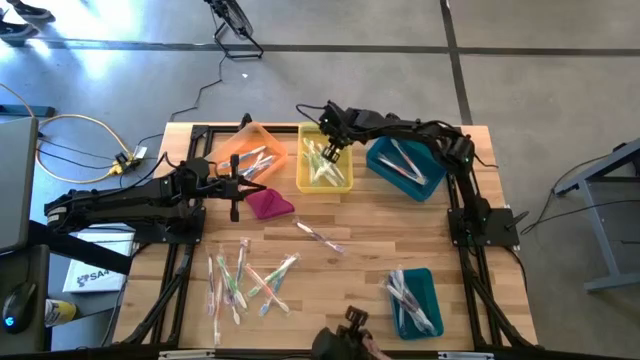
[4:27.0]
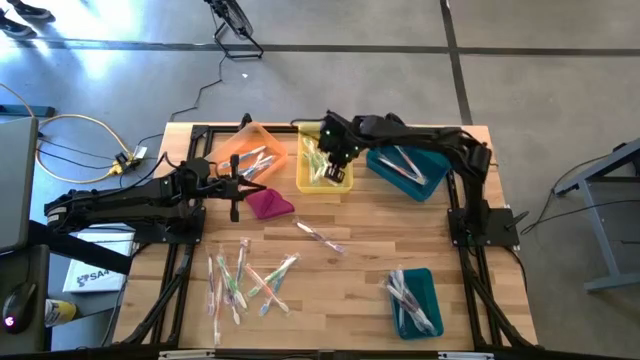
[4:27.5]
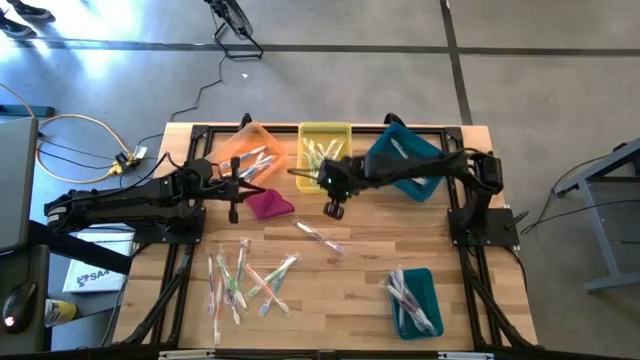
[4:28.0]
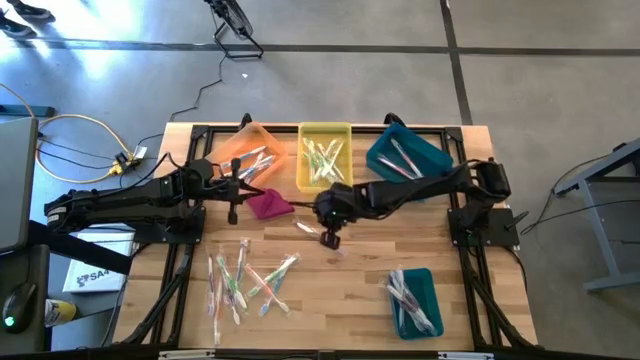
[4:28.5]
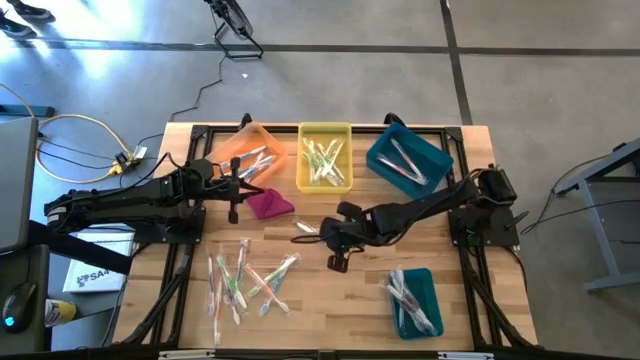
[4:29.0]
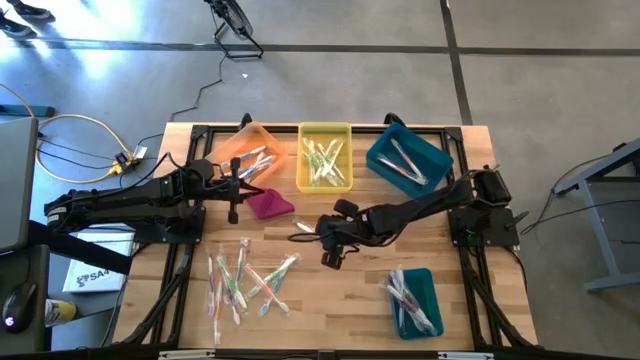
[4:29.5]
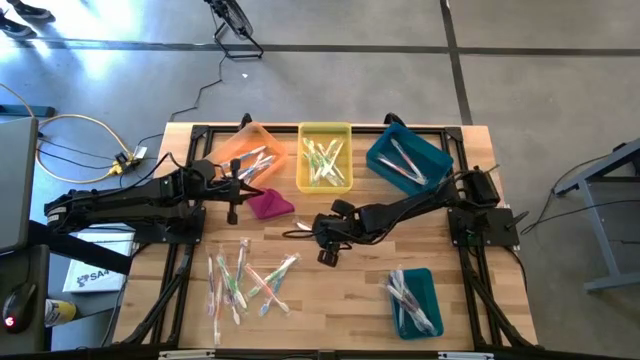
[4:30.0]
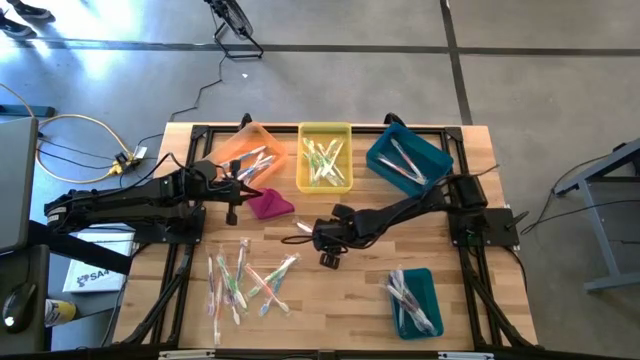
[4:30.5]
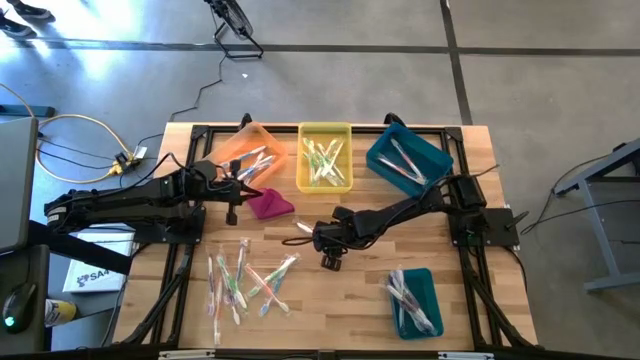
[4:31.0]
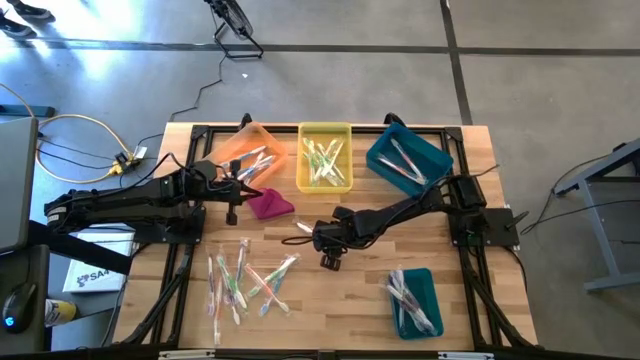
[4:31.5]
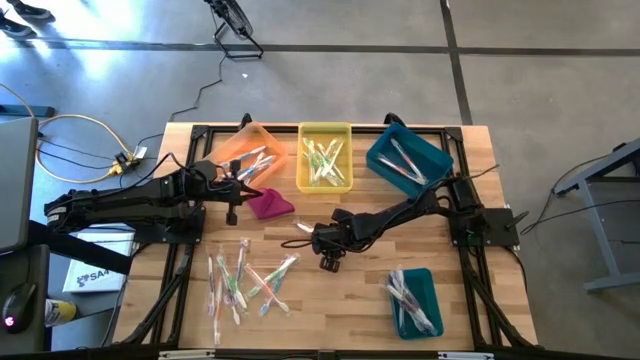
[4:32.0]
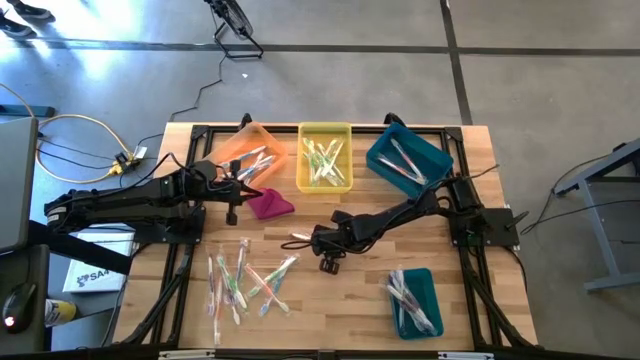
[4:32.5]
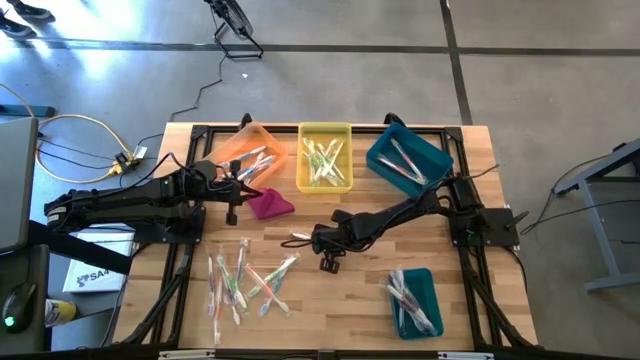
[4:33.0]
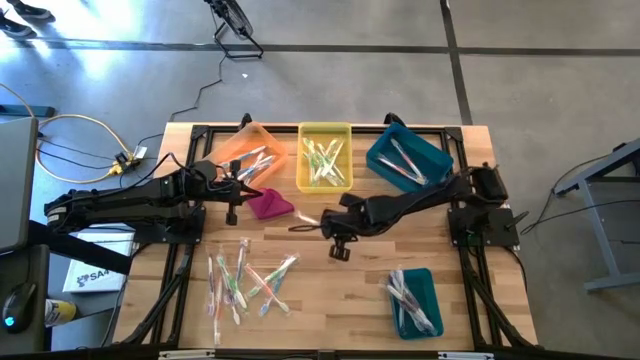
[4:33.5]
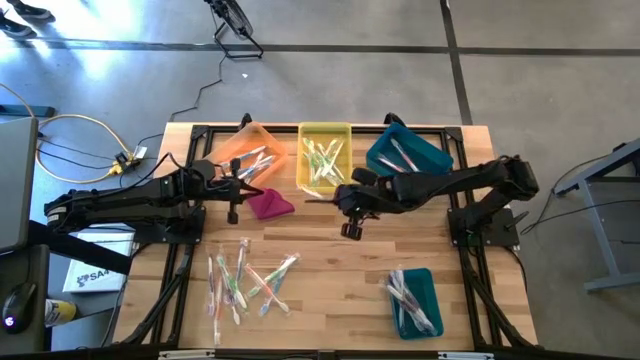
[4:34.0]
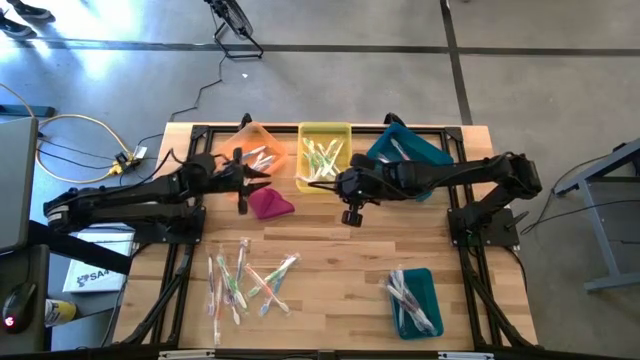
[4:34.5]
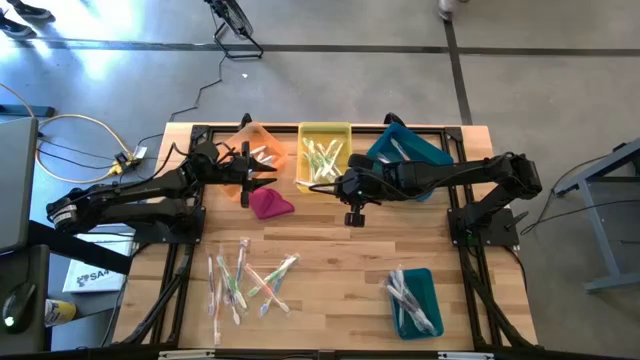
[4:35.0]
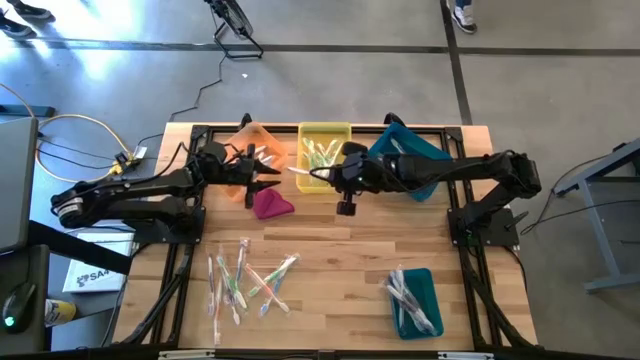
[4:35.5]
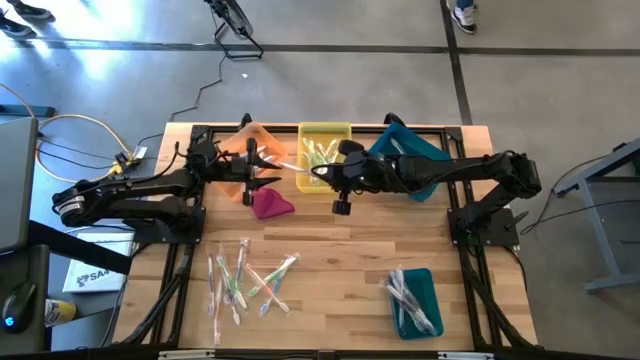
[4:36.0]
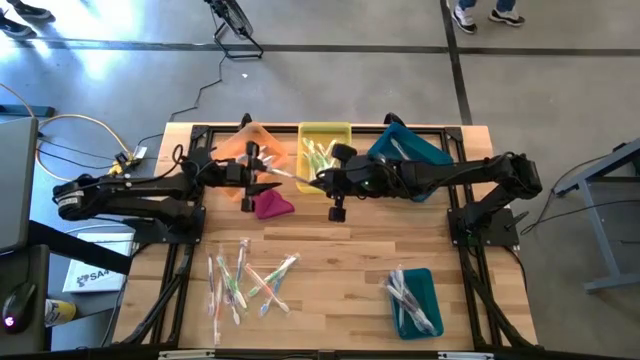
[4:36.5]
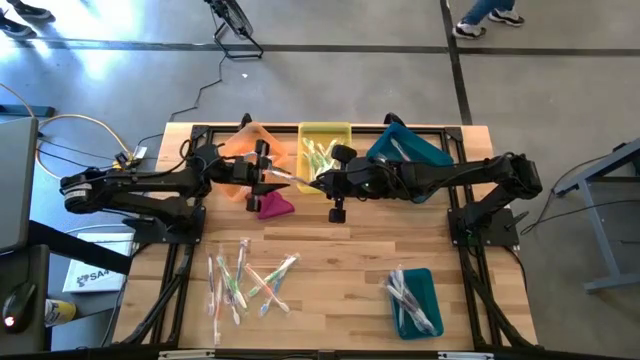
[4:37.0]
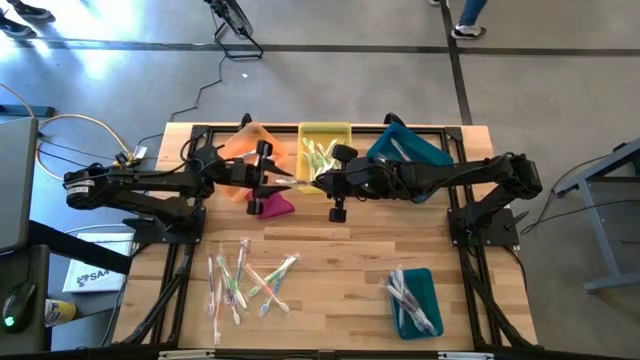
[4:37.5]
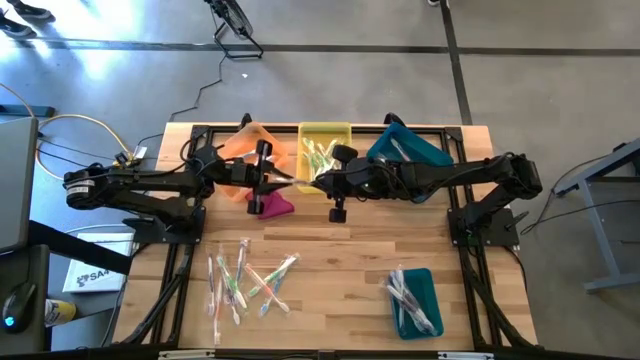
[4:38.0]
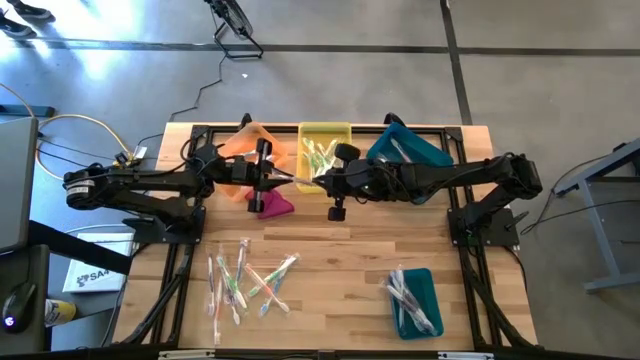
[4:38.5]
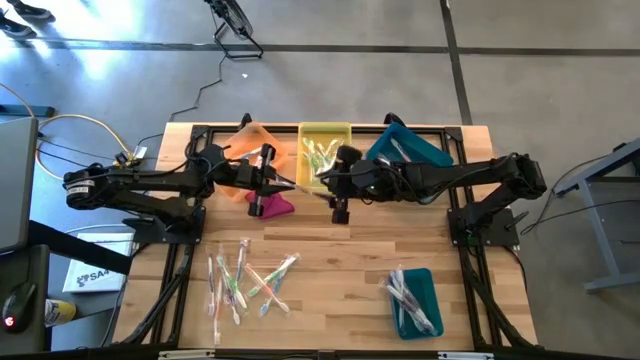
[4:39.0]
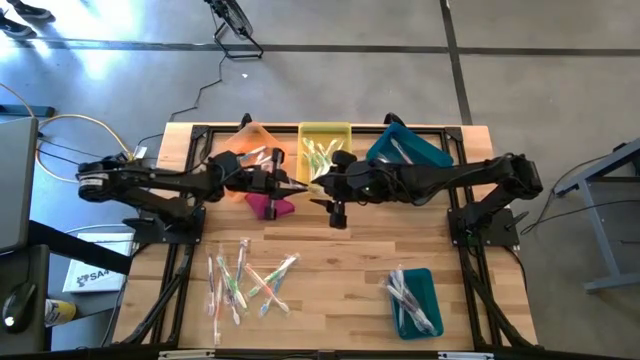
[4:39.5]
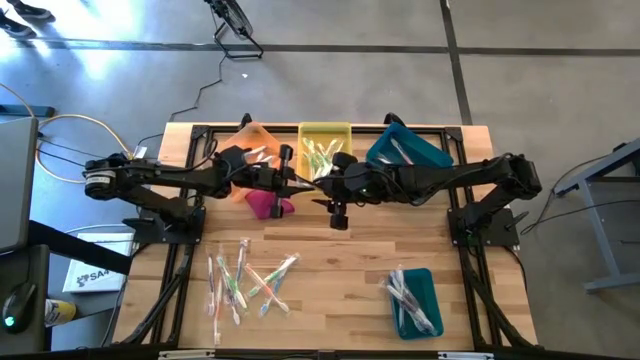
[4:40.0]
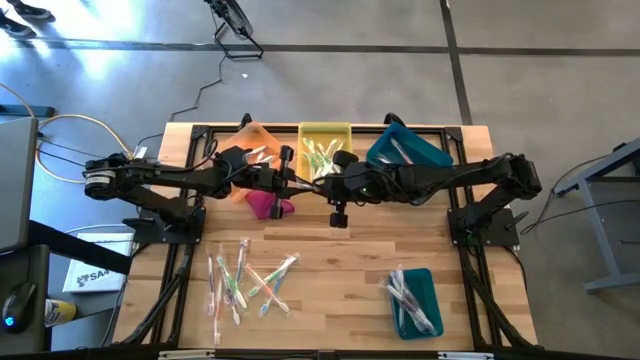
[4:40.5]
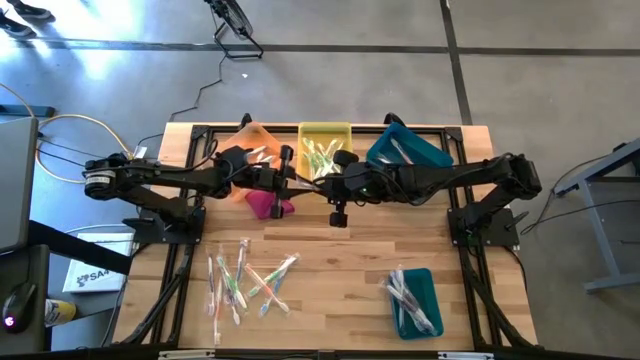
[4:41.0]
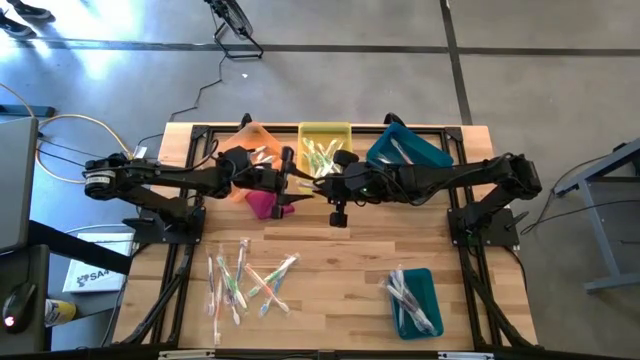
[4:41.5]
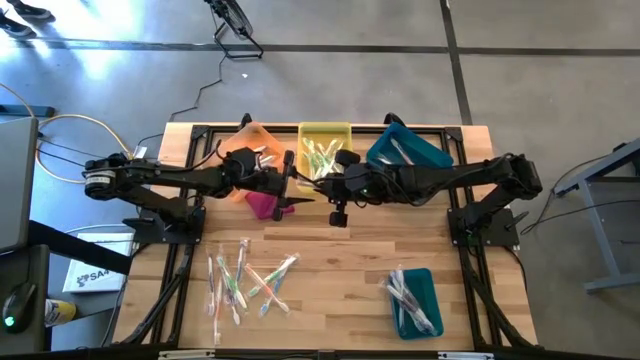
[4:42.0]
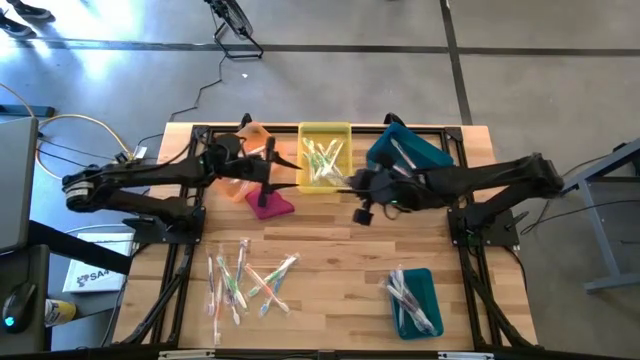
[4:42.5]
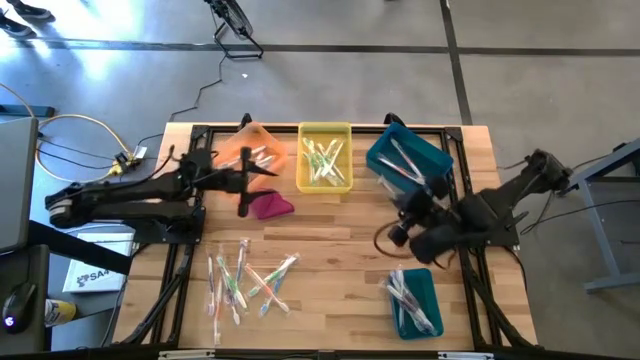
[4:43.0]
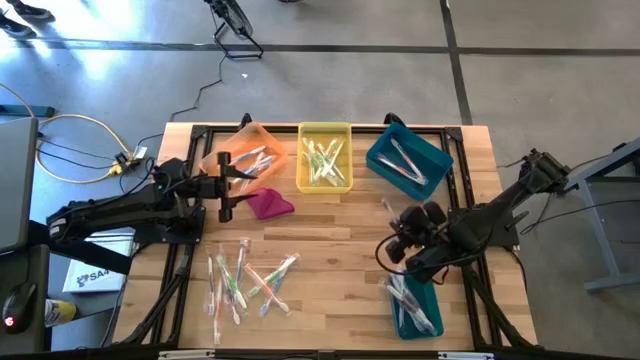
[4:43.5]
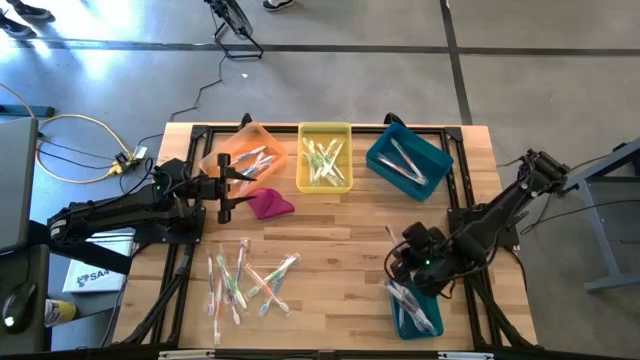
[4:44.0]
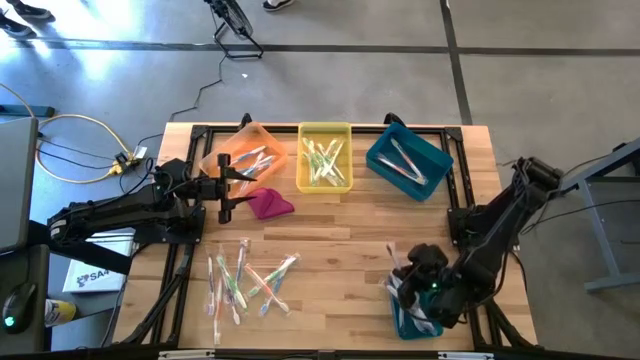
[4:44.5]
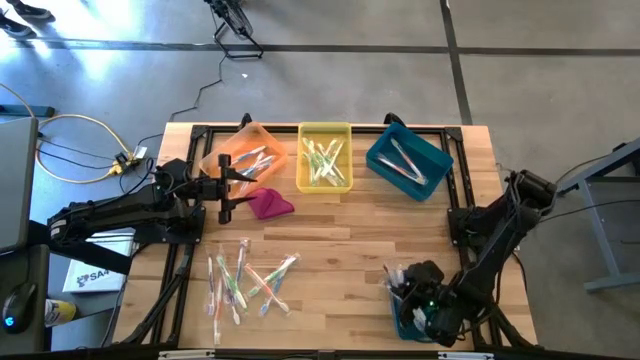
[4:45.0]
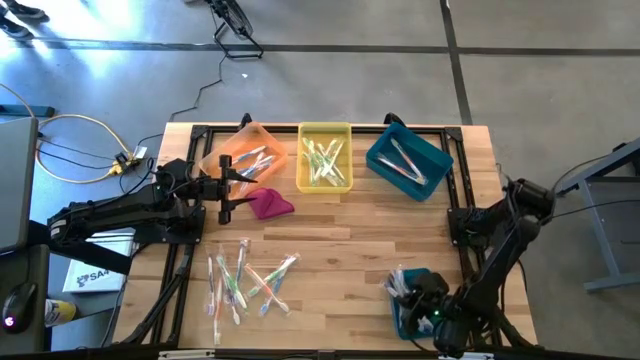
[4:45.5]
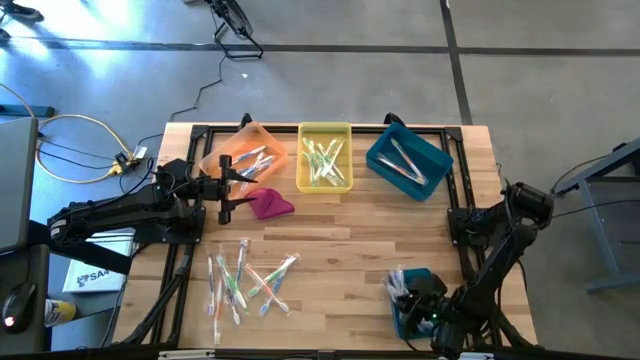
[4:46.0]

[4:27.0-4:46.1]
Task: Pick & Place Toothbrushes
Put the purple toothbrush into the bottom blue bin

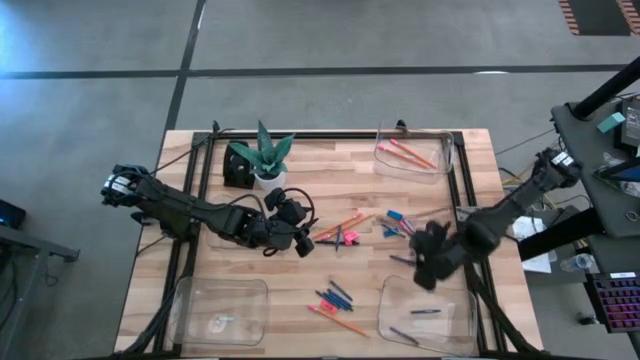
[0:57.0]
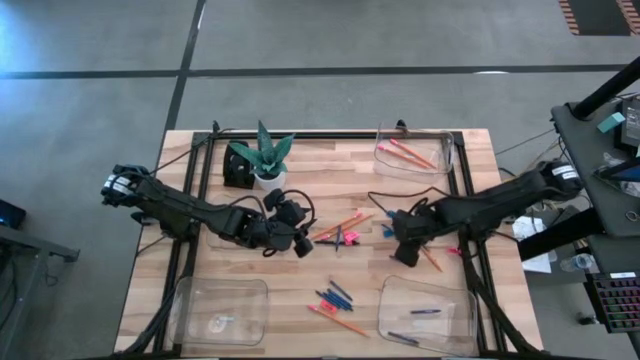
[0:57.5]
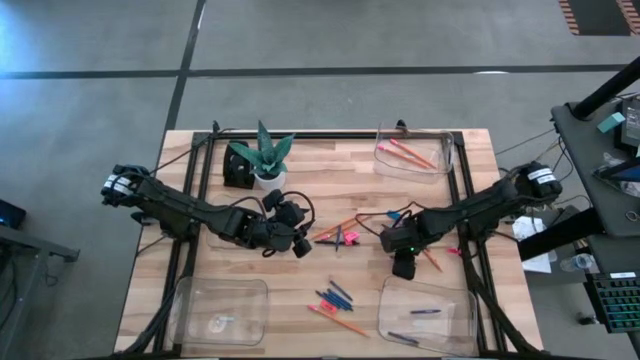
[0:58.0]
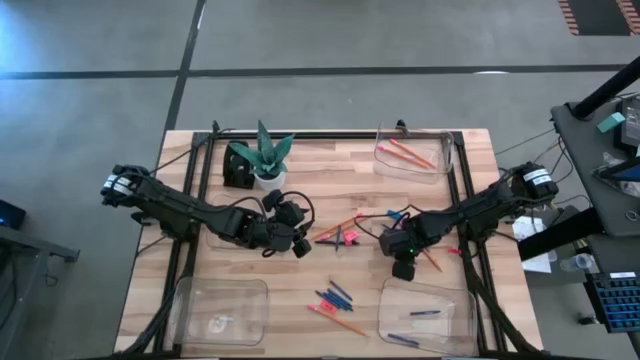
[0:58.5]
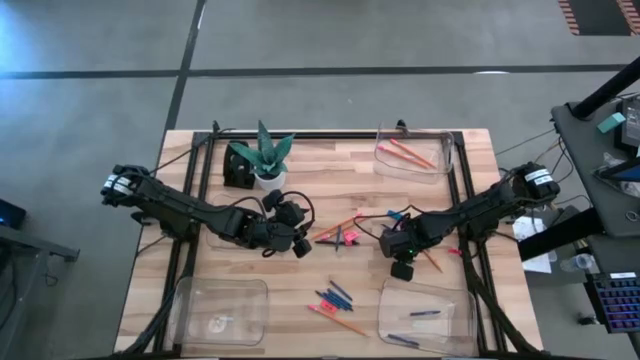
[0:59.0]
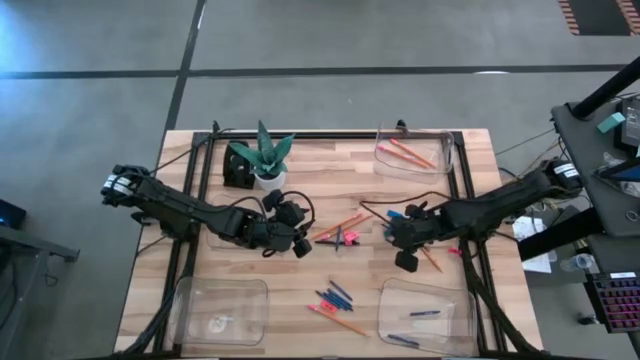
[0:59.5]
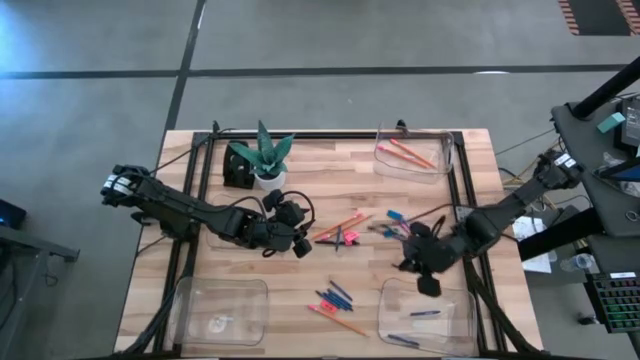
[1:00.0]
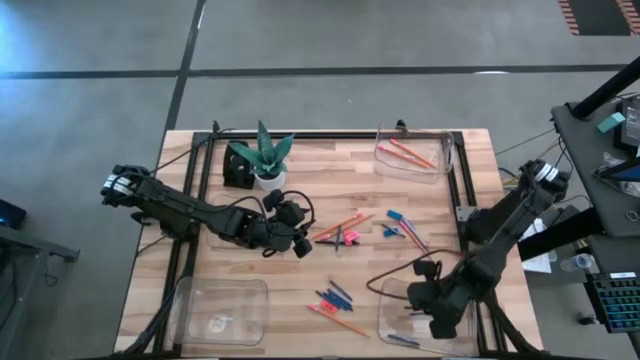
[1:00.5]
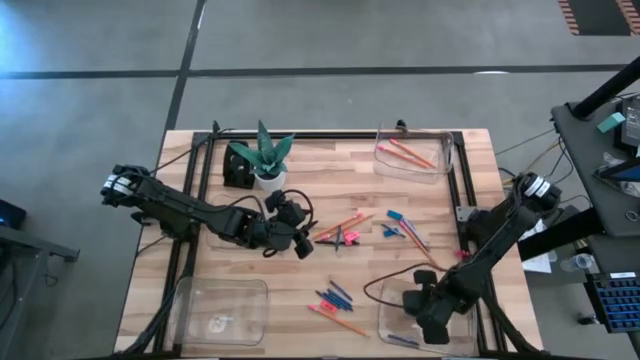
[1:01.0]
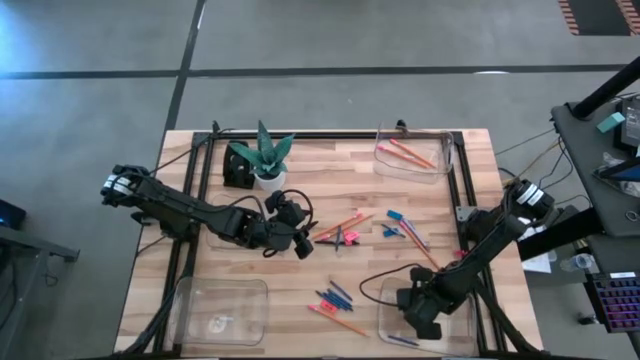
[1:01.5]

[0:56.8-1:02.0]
Task: Sort crayons/erasers/pens/pencils in bins
Put the blue crayon into the bottom right transparent bin
